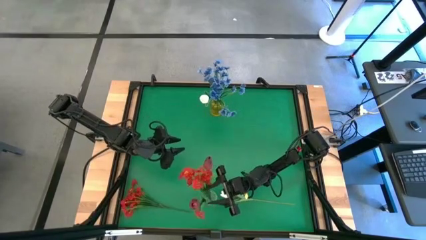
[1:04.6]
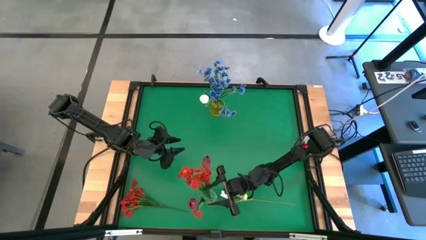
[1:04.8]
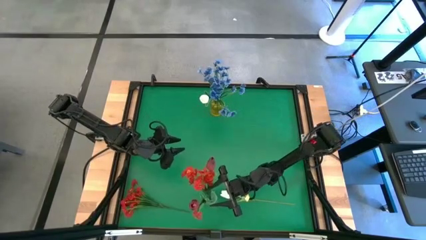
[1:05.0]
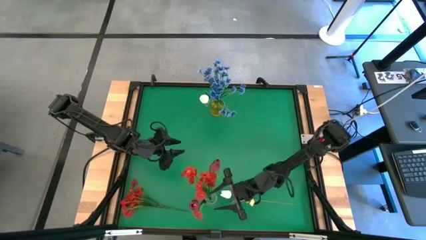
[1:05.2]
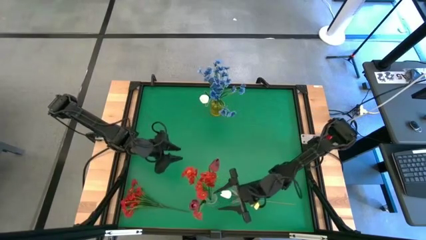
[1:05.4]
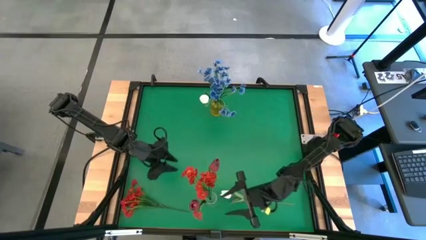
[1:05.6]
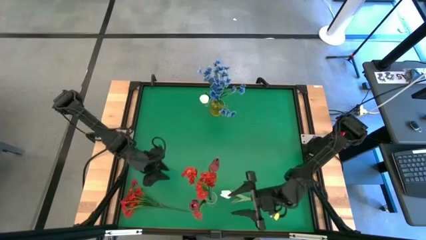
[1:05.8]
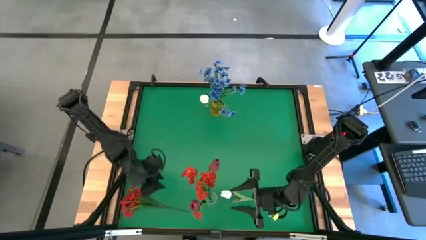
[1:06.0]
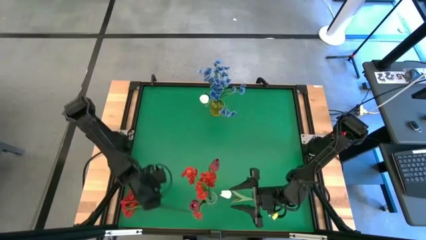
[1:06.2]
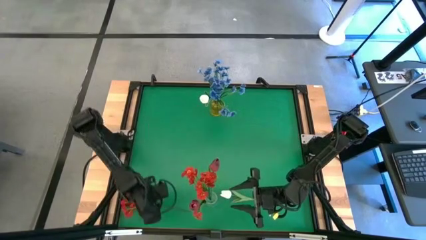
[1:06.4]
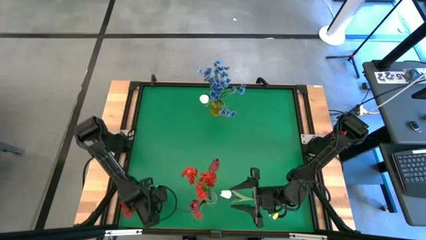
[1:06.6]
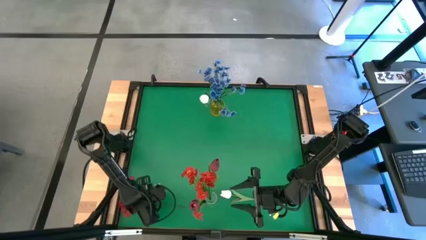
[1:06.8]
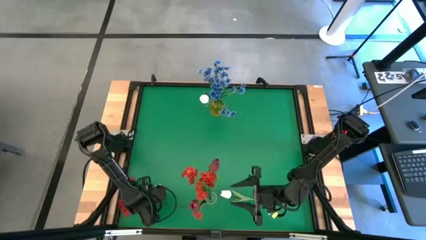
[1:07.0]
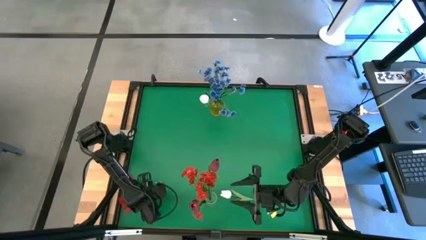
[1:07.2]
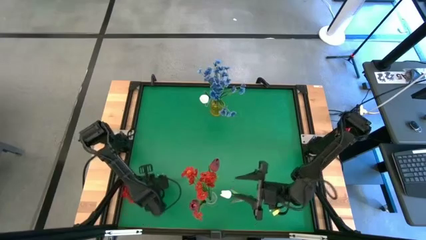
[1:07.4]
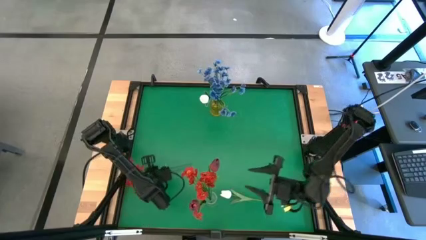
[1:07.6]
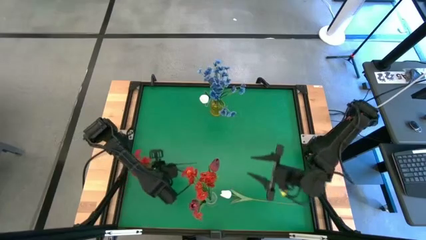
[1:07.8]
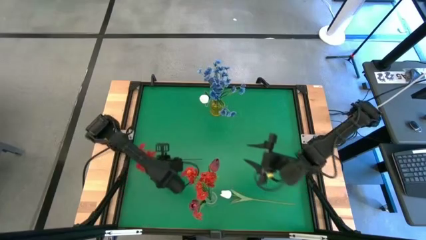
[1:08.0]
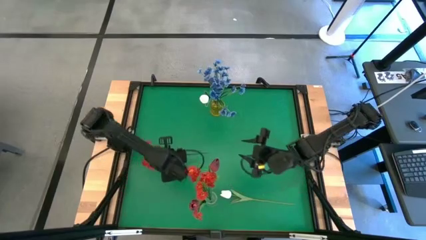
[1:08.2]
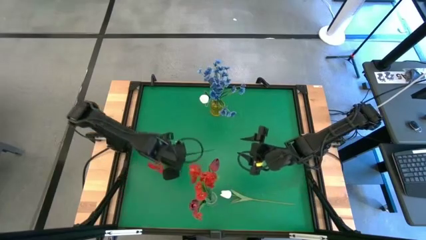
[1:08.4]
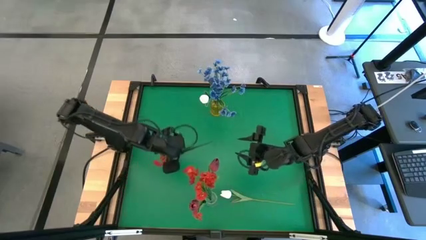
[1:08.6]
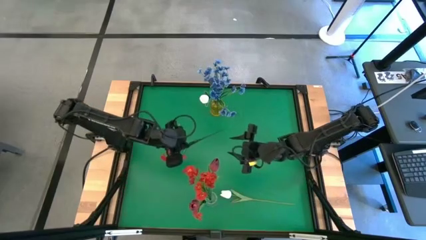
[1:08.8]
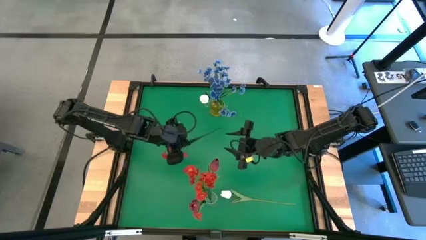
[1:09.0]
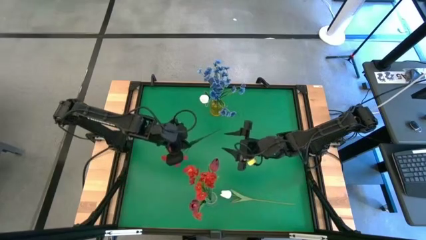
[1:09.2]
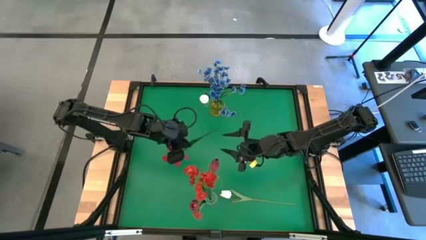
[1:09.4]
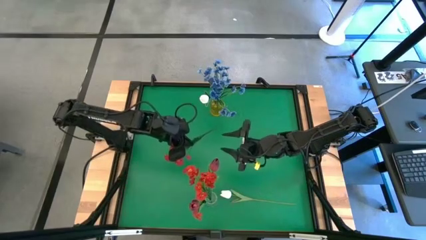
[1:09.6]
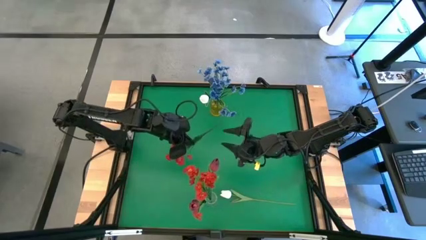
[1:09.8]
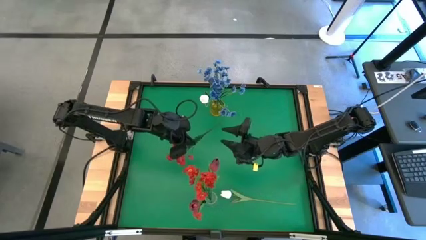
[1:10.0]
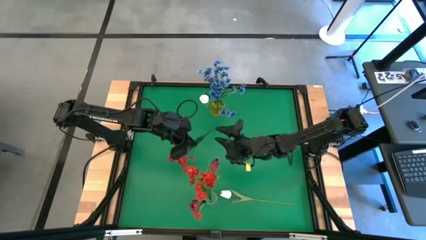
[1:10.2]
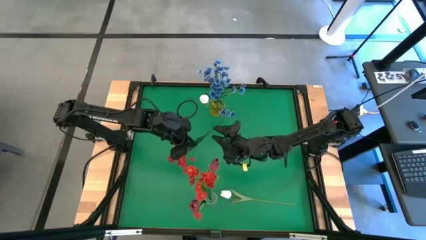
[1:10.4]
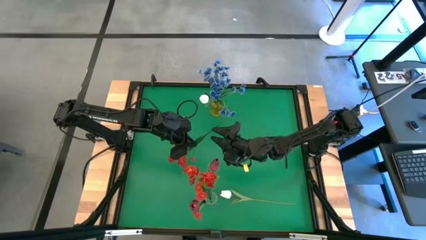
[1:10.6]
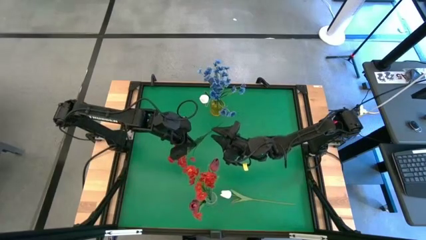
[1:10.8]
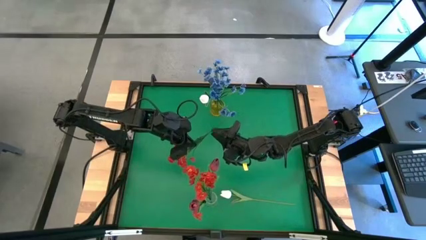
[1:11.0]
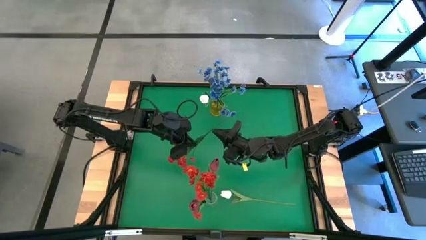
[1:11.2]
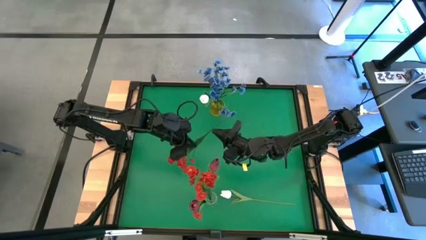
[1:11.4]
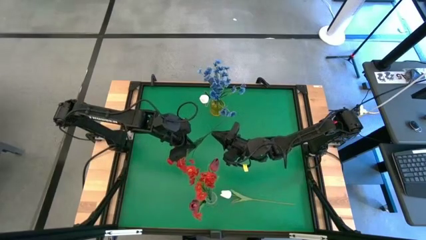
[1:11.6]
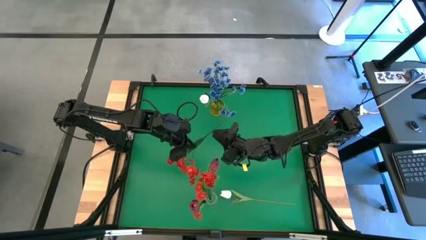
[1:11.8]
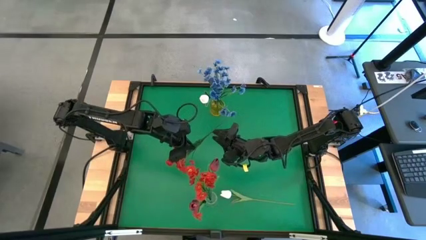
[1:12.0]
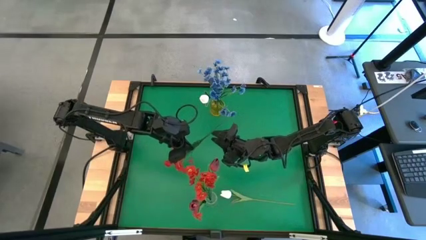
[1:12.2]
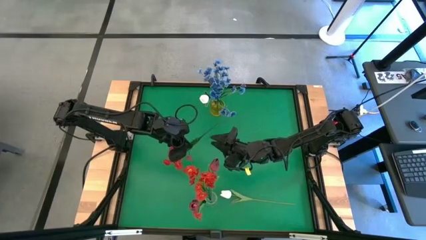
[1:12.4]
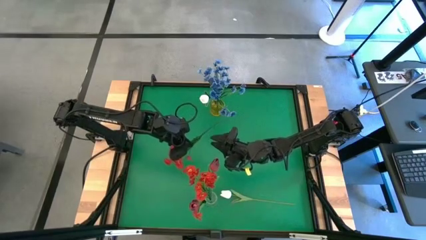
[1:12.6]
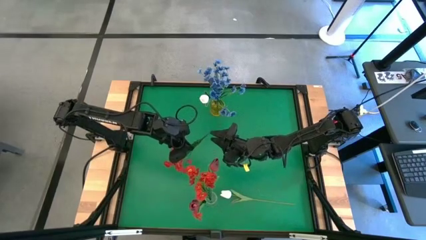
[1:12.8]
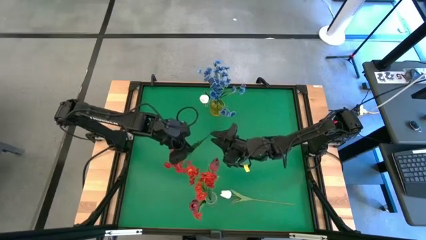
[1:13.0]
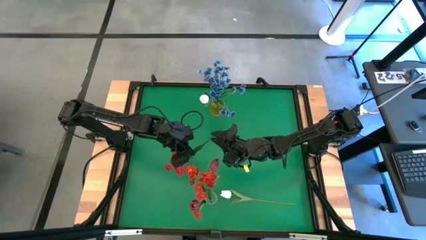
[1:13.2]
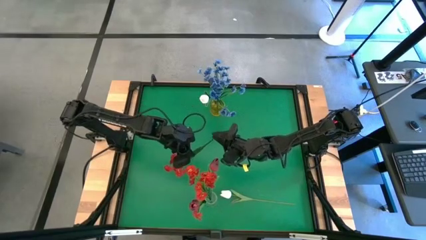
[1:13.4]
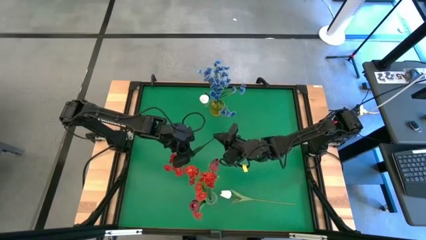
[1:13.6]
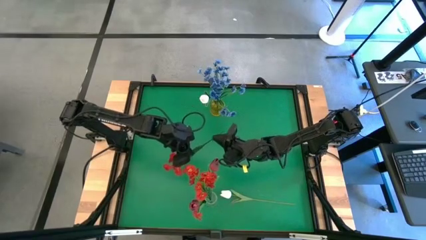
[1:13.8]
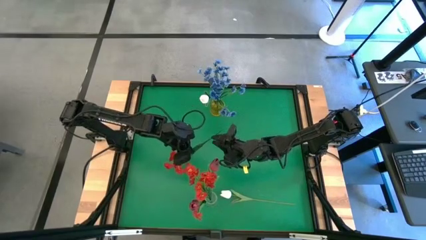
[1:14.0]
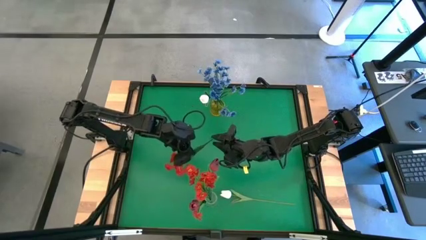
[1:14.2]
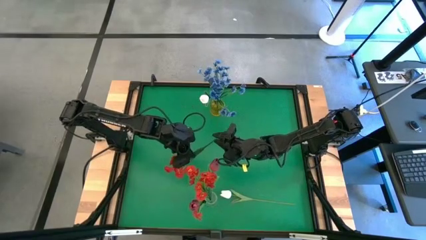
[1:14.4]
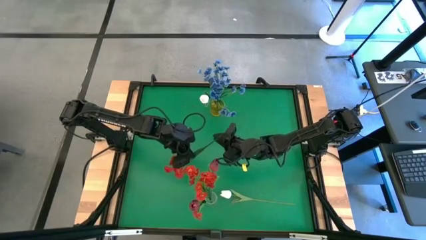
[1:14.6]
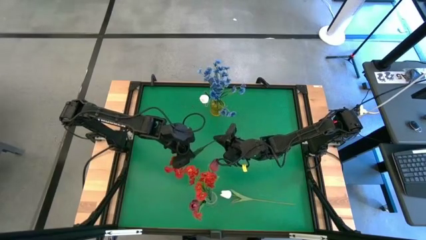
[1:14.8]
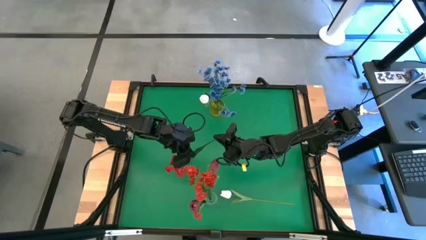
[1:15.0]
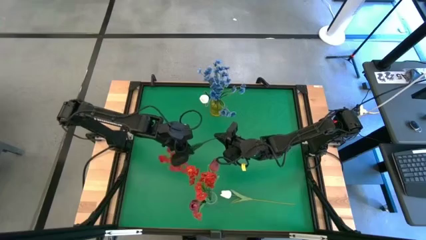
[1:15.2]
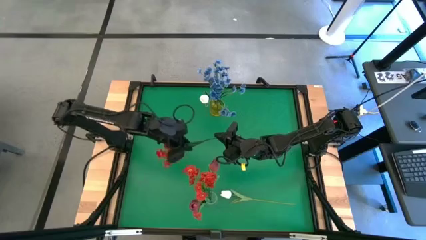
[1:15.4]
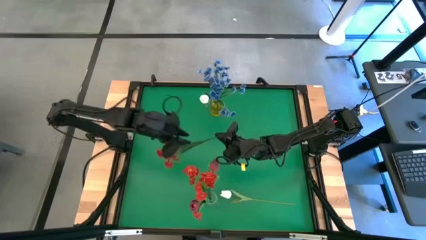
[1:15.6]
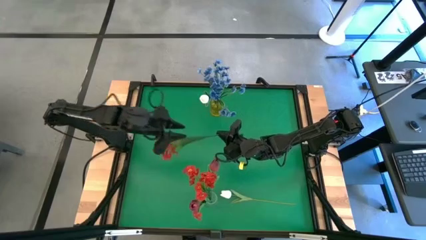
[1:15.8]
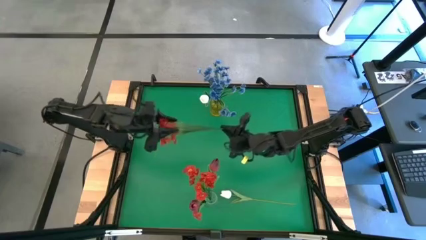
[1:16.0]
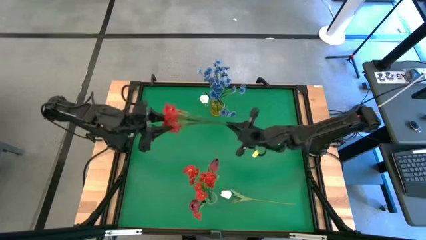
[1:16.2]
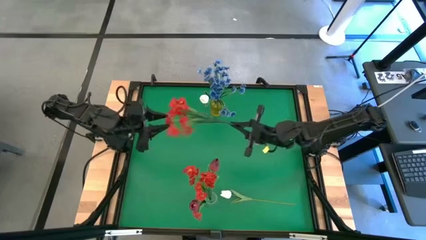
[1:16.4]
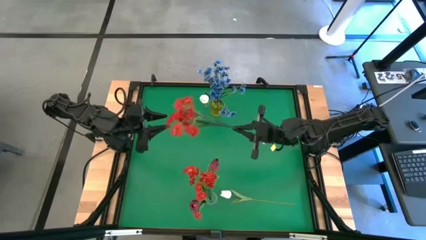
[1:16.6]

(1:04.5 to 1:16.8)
Task: Sort flowers into vase by color
Put the red flowers into the transparent vase

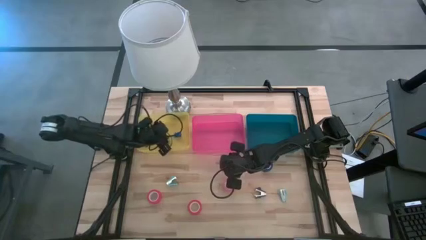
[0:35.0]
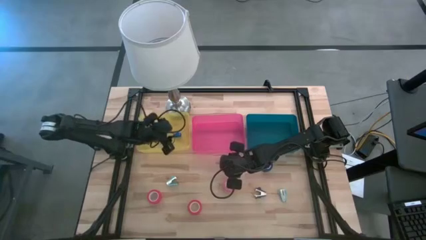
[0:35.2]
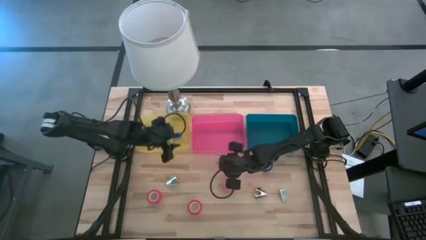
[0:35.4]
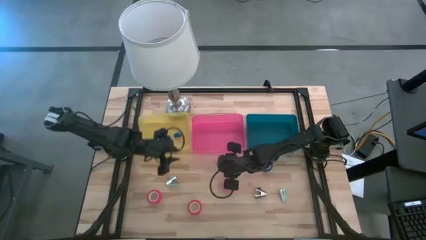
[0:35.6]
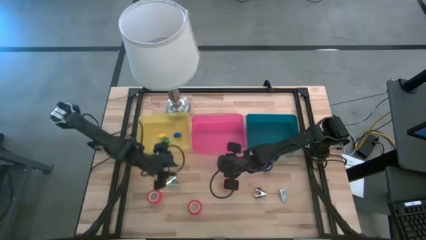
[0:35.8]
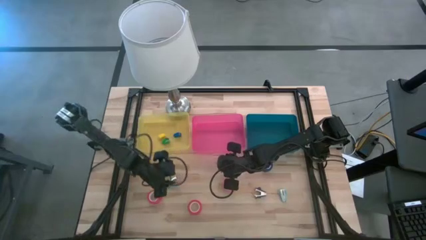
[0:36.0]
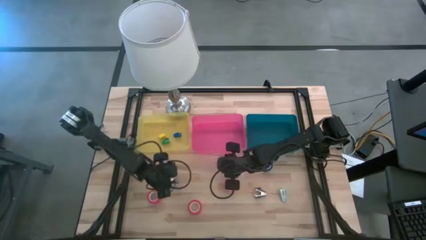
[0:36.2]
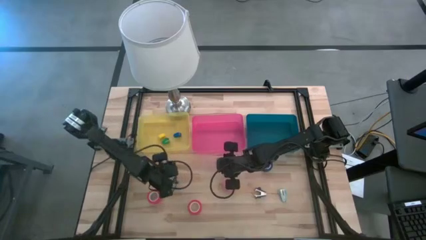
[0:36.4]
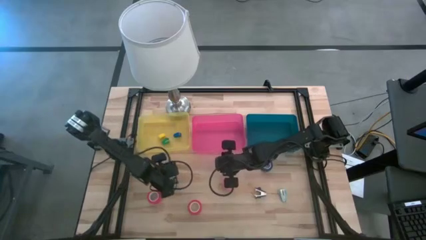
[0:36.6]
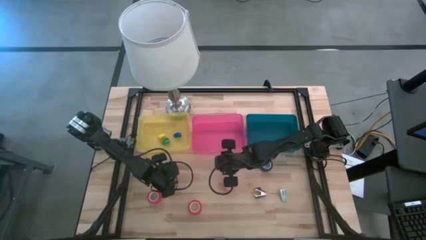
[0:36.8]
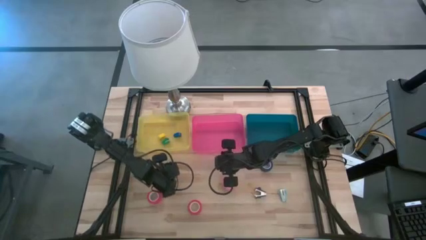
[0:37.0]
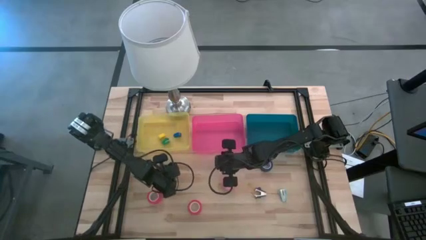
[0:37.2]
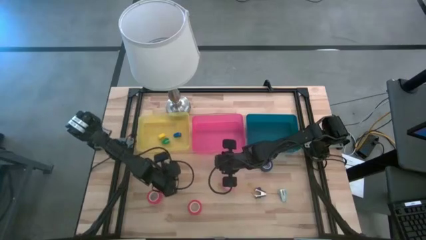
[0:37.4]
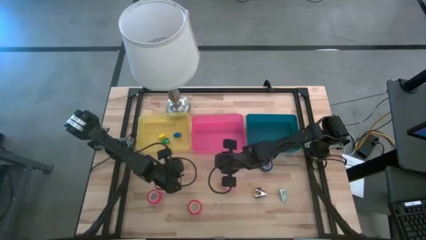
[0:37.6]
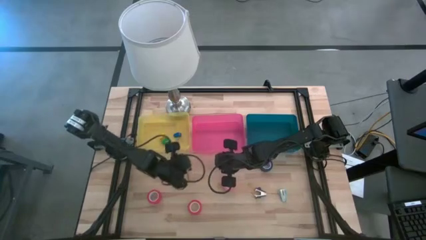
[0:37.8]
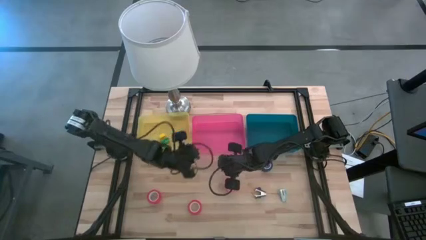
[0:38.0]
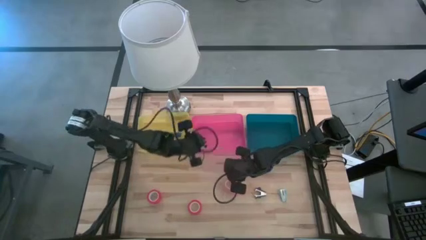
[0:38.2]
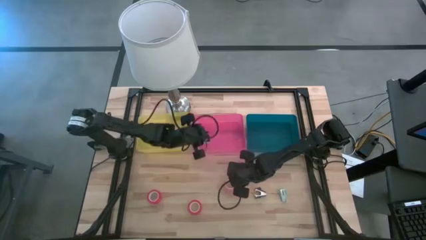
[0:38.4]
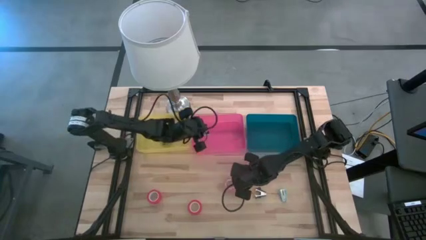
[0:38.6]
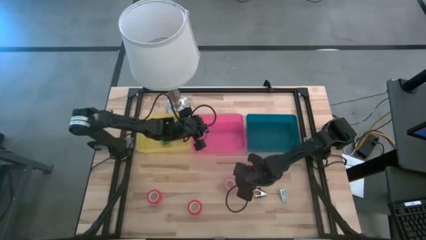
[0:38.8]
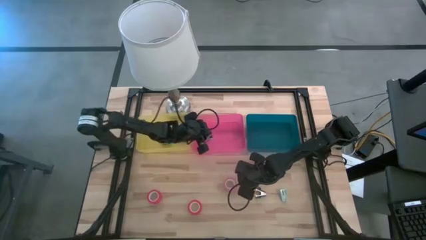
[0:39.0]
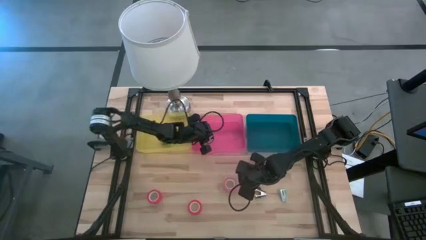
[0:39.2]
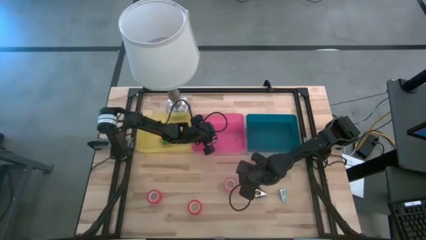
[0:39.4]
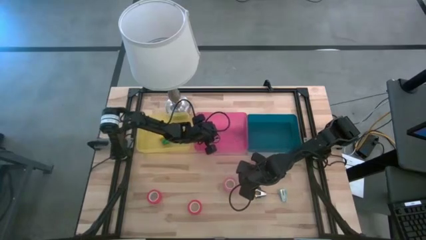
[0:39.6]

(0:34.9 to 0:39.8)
Task: Pick and place Stapler, Stapler remover, tape
Put the left light blue staple remover into the pink bin
